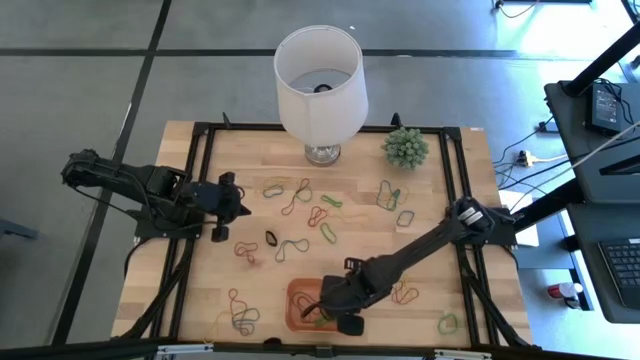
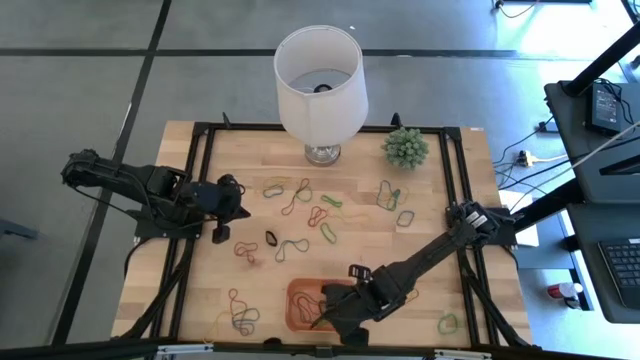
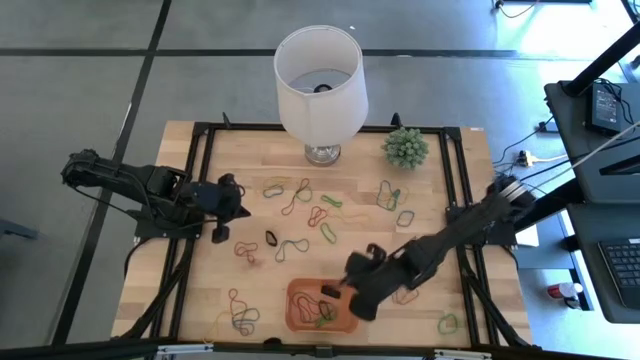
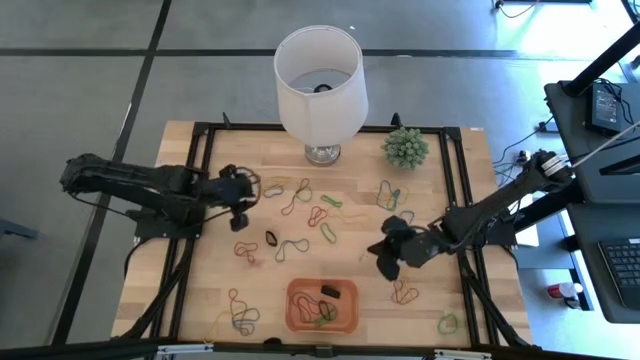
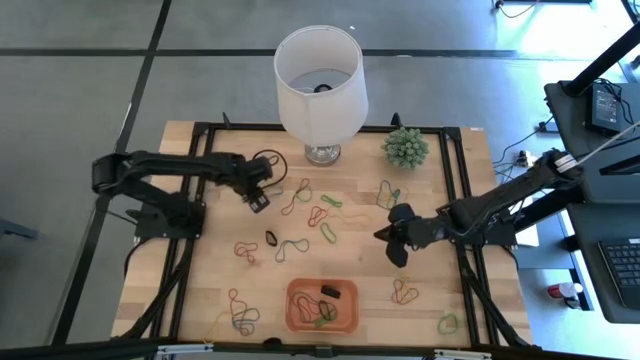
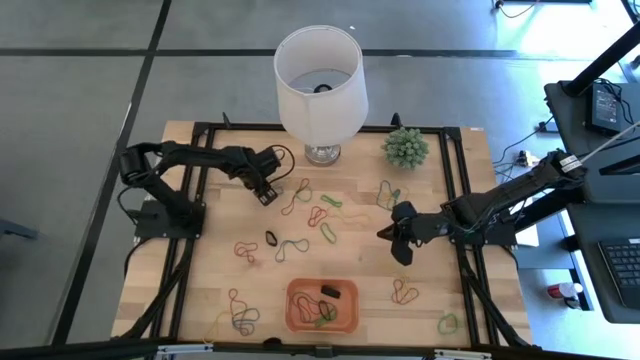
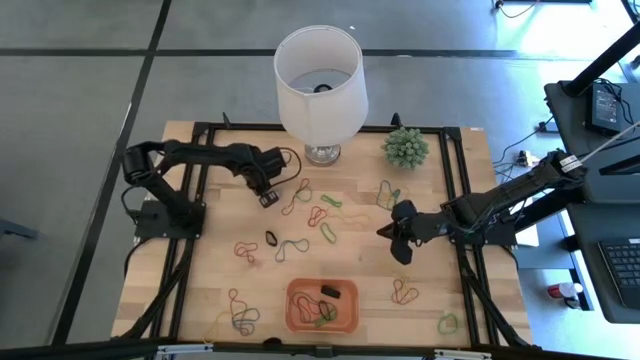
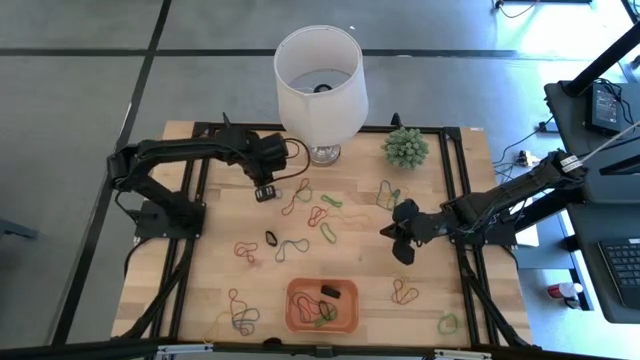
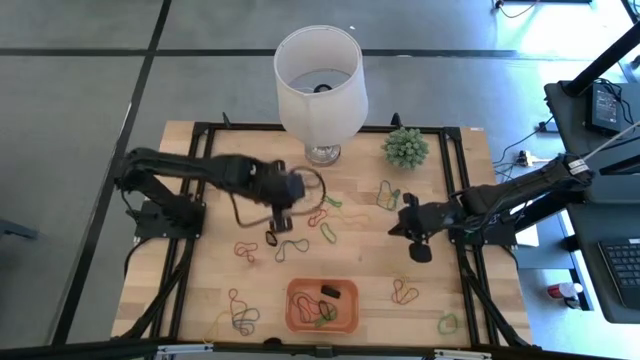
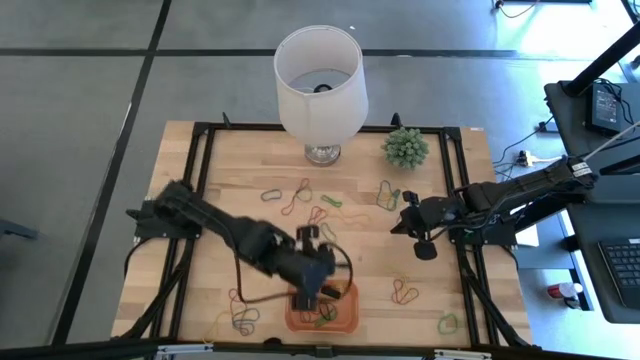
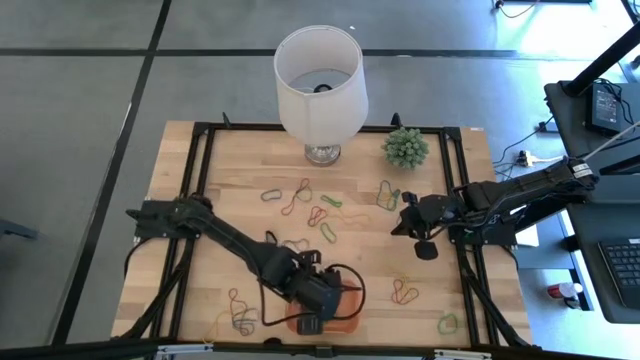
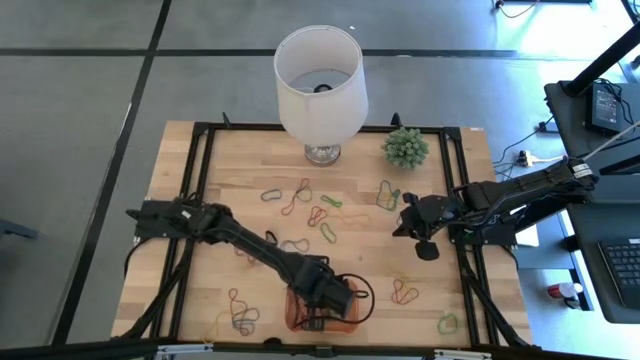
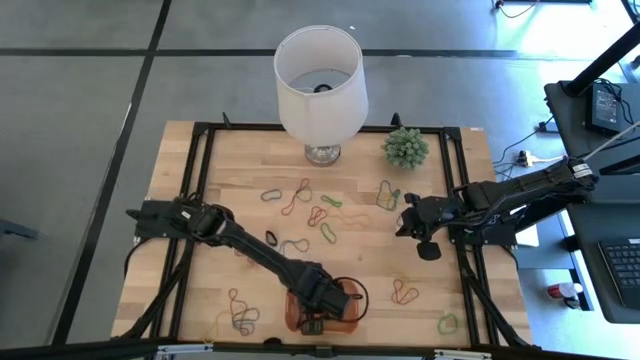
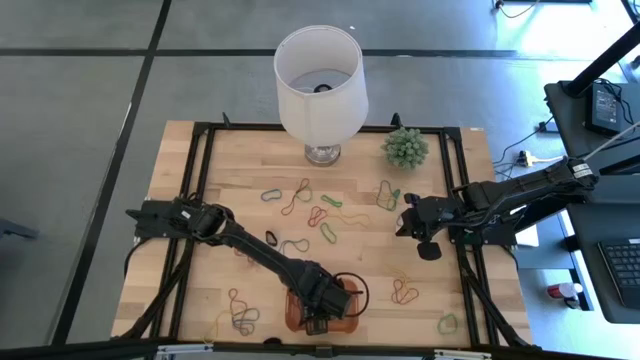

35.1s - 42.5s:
Task: Pick and place rubber bands into bin
Put the yellow rubber band into the orange bin

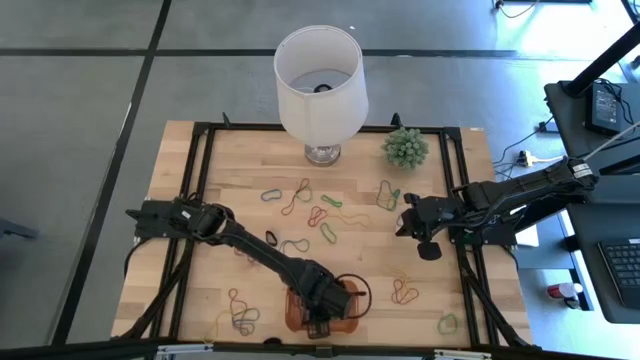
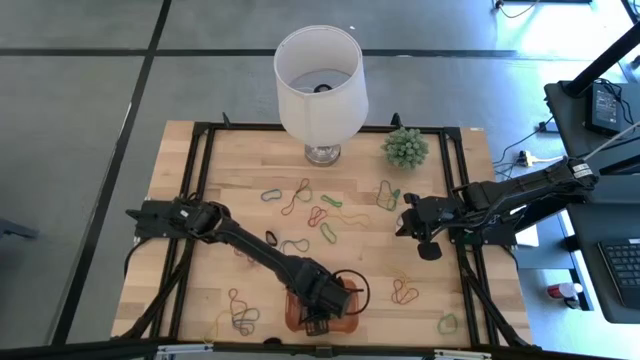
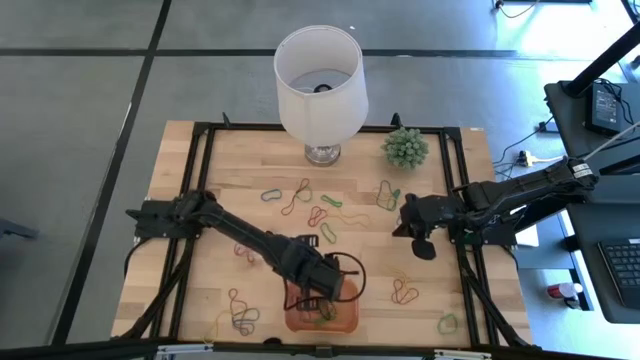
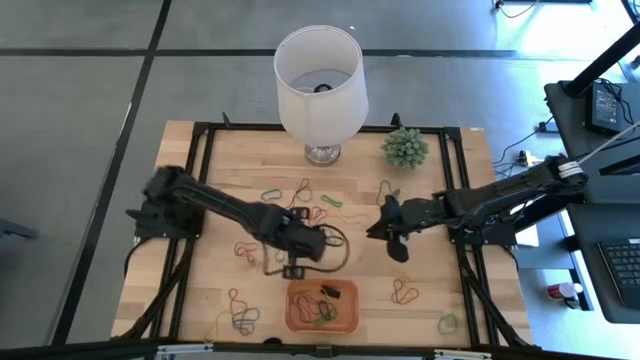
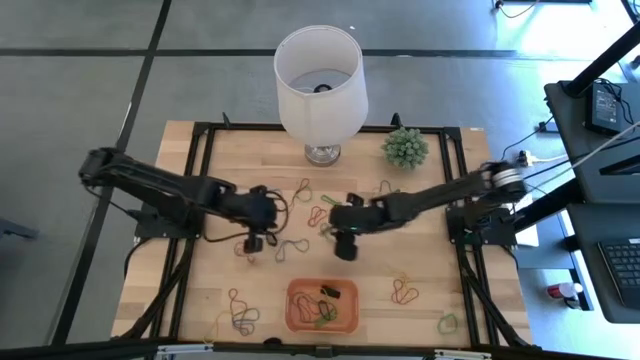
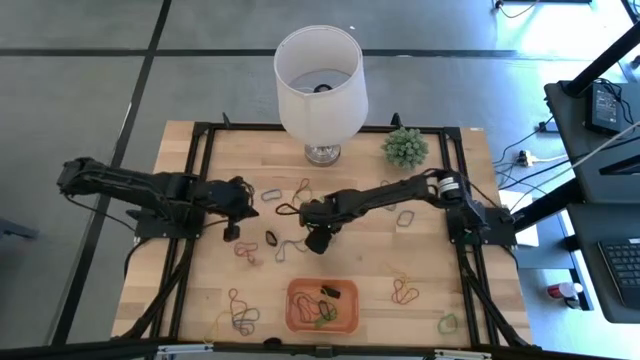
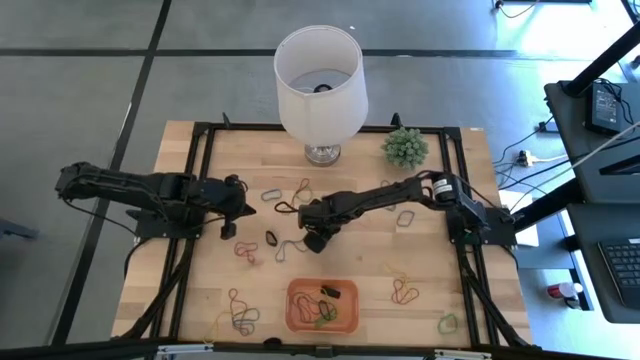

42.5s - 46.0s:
Put the green rubber band into the orange bin

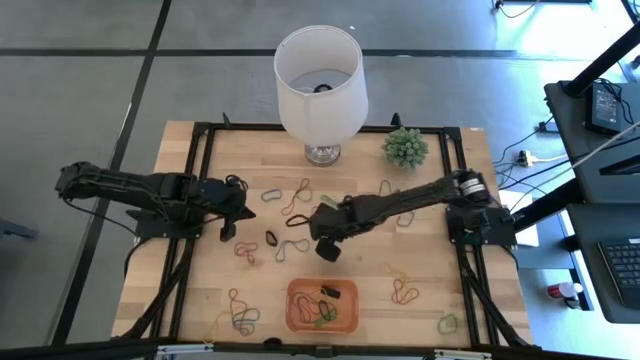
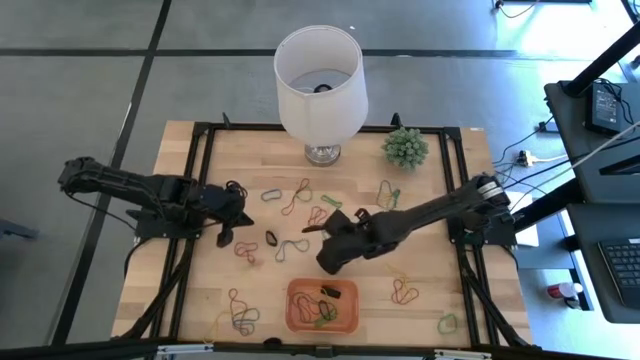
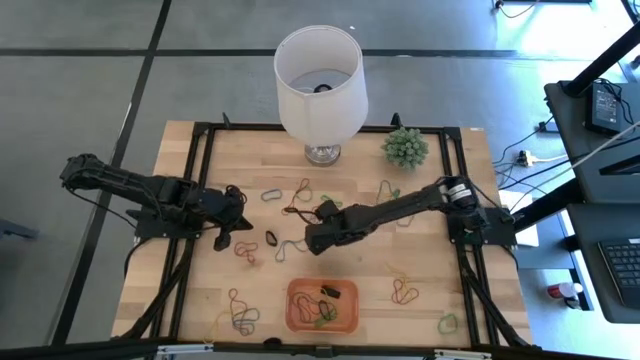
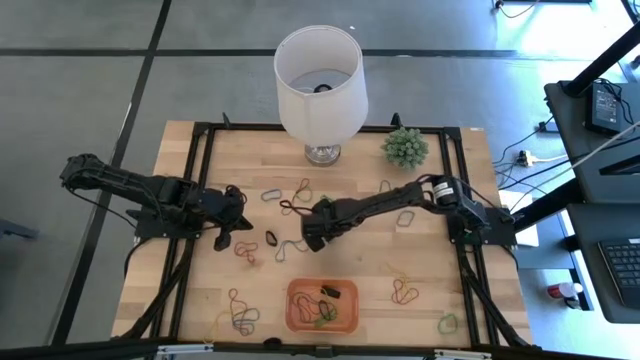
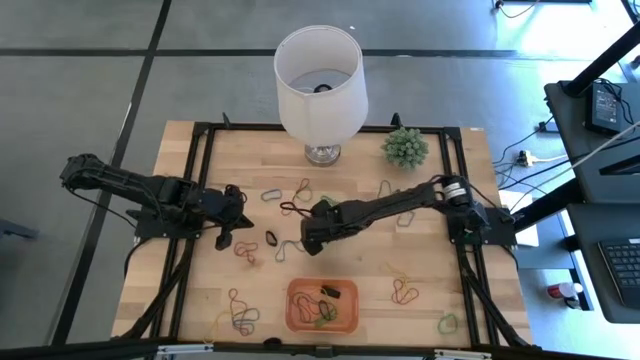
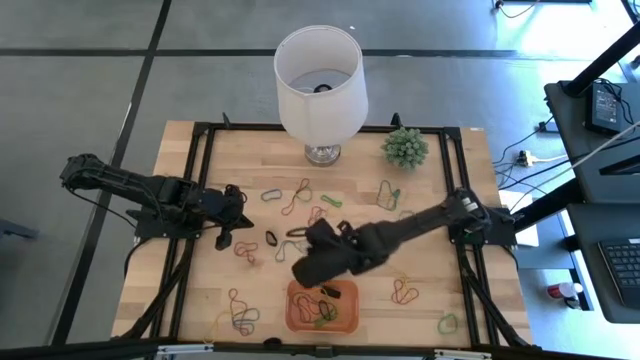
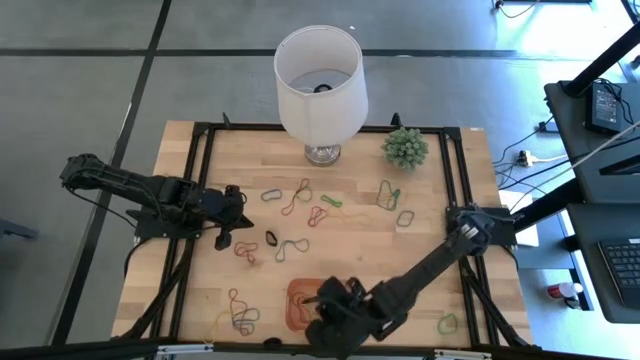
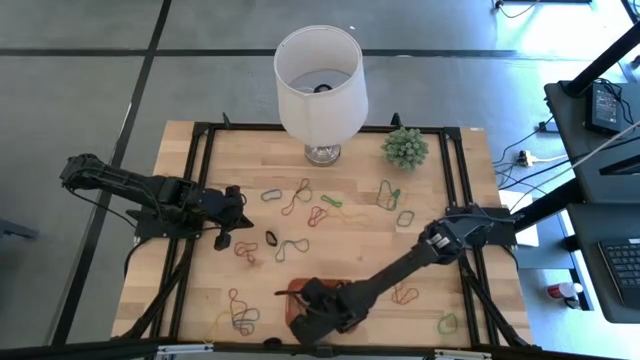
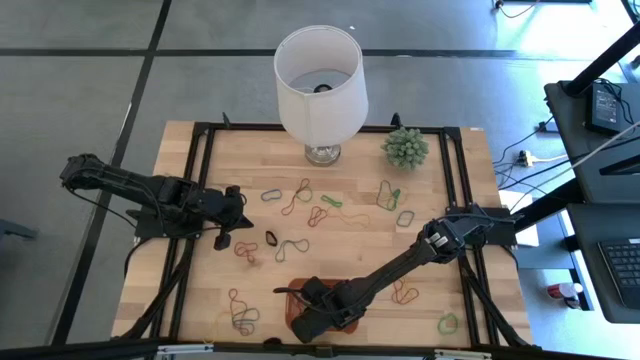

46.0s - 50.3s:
Put the green rubber band into the orange bin

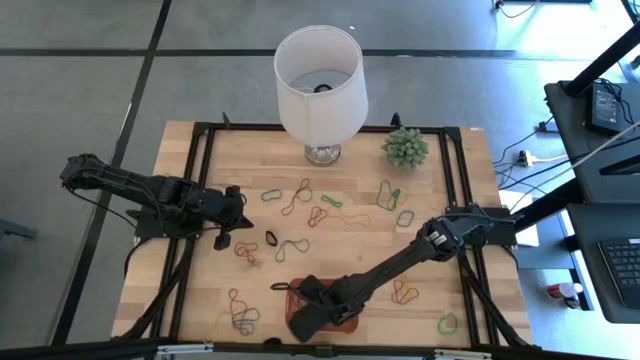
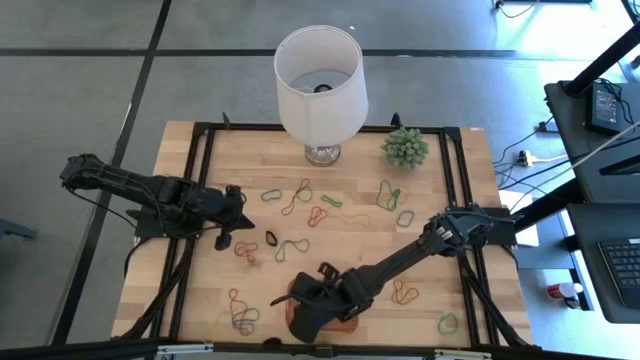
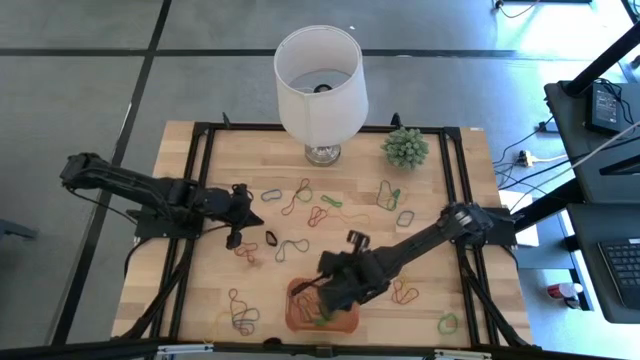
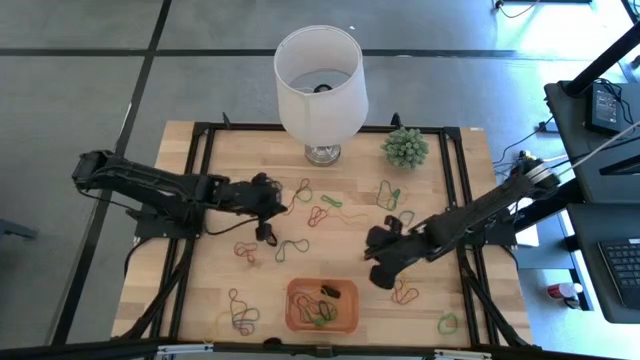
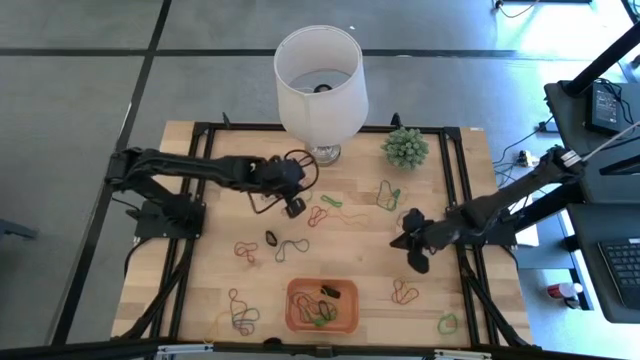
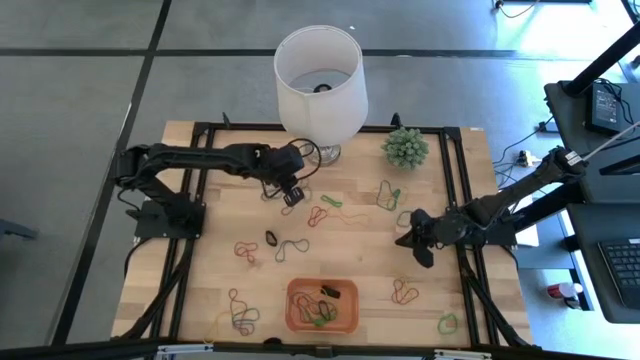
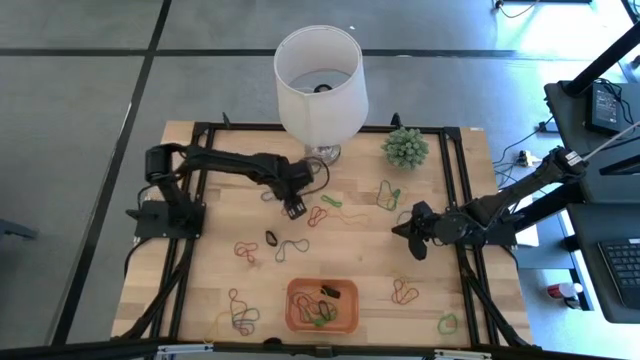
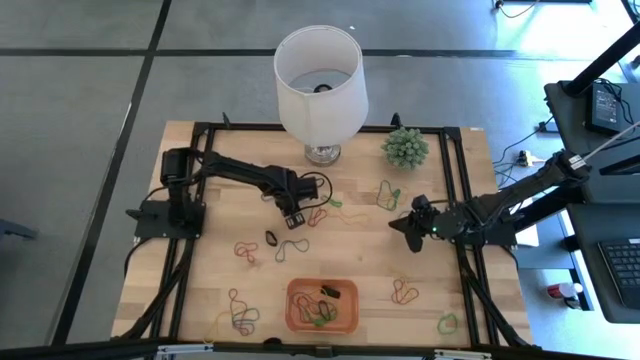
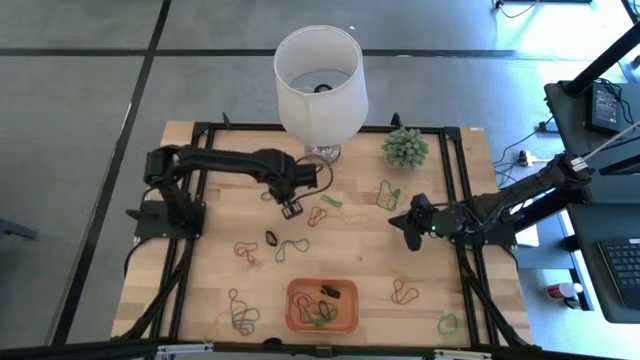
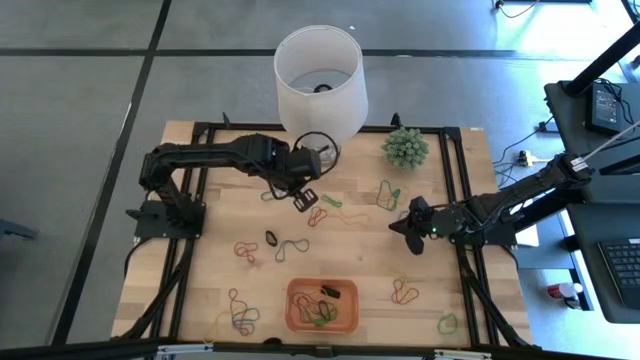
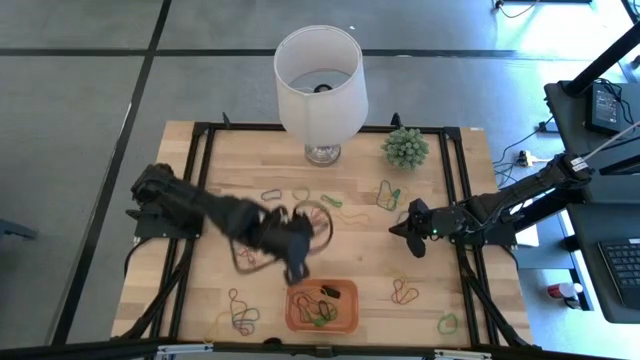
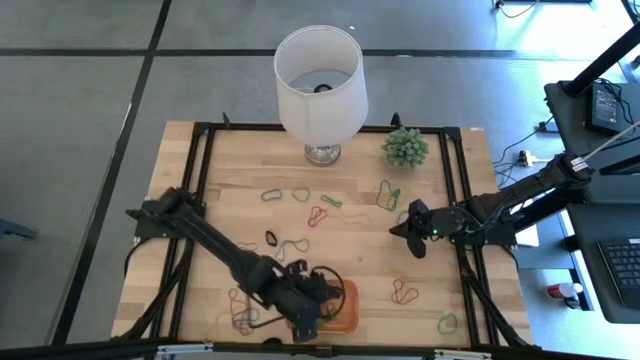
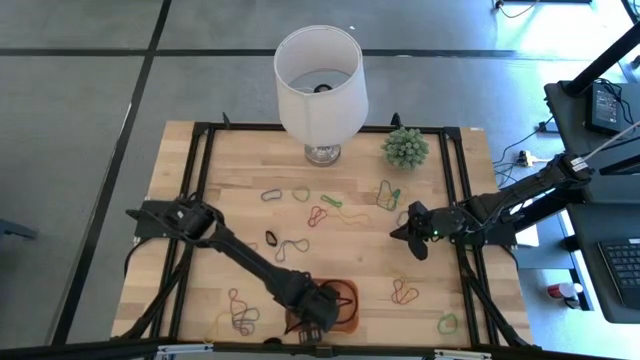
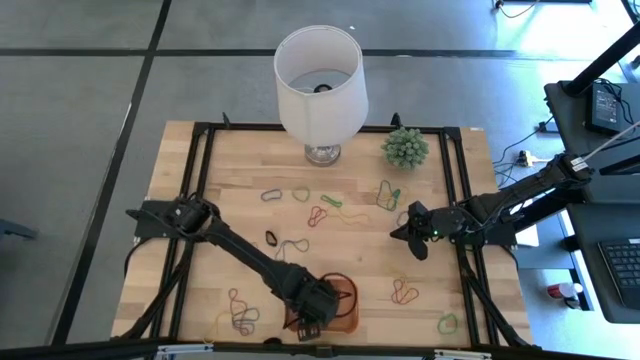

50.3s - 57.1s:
Put the red rubber band into the orange bin
